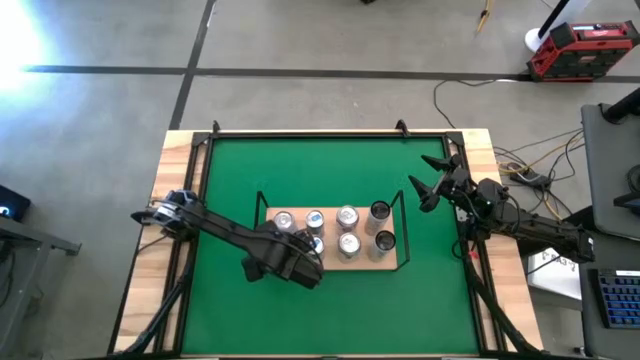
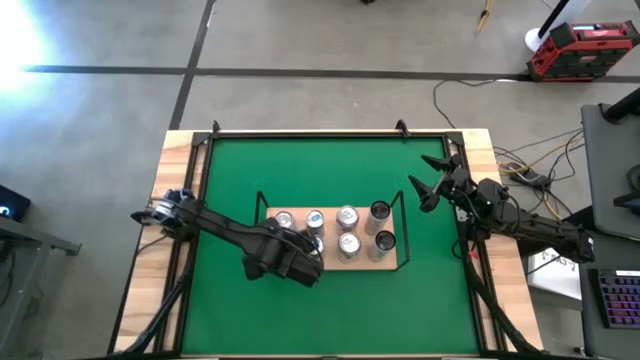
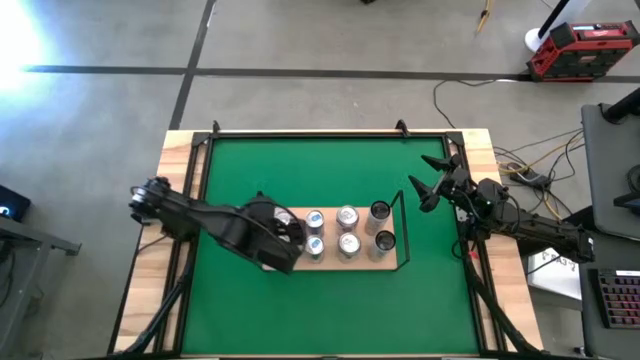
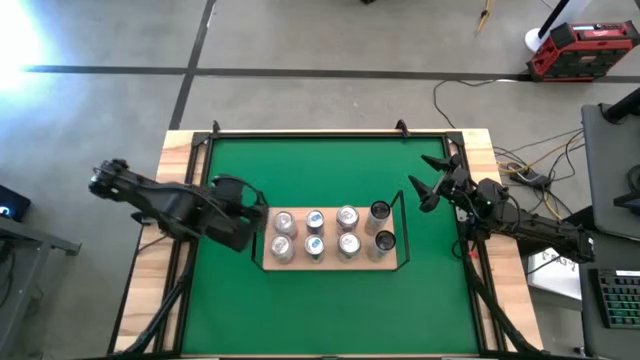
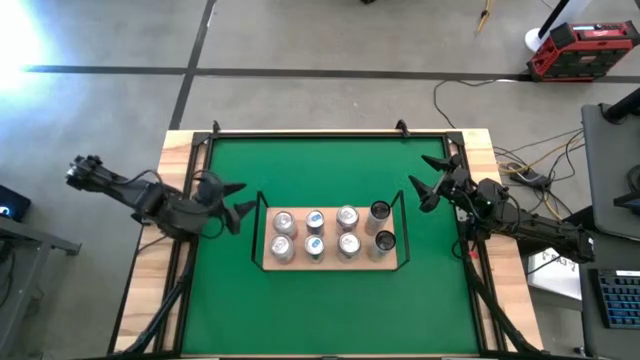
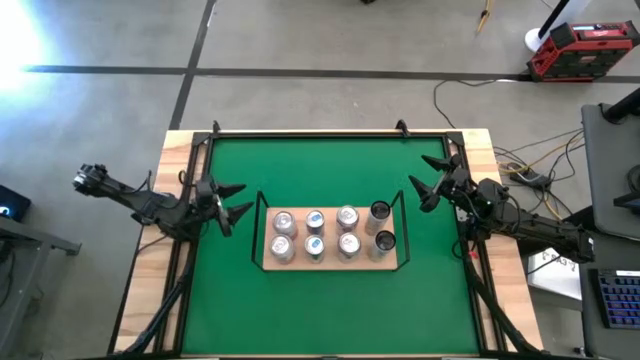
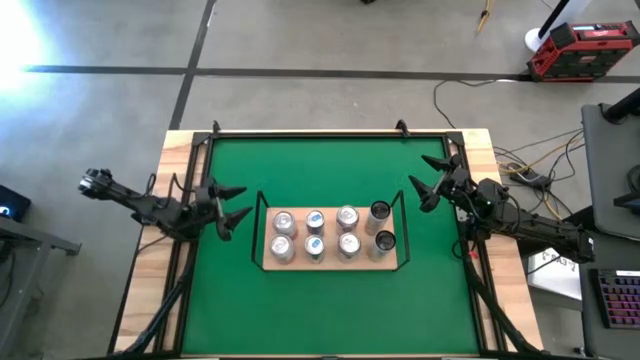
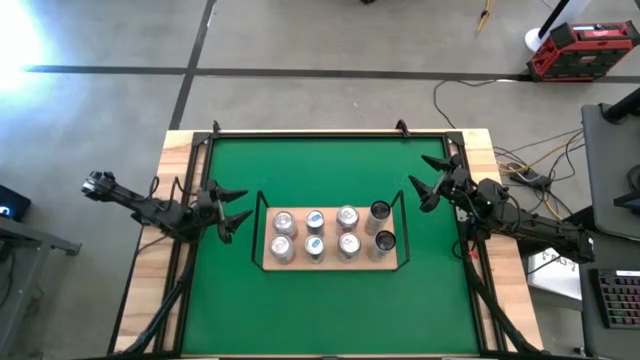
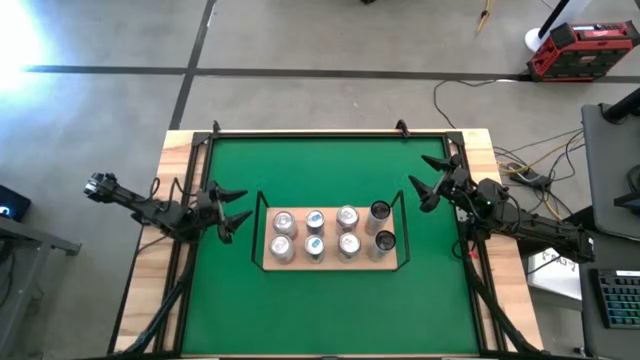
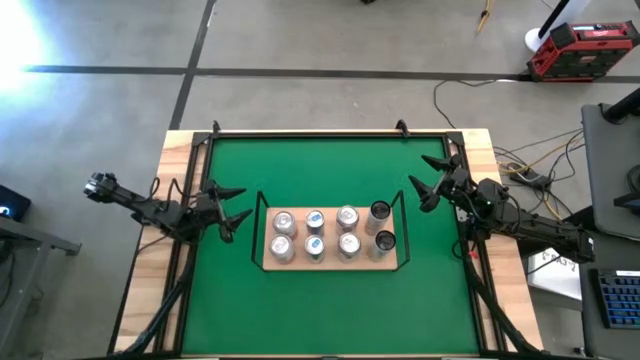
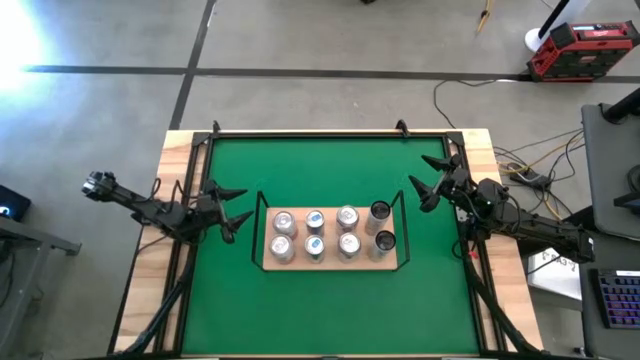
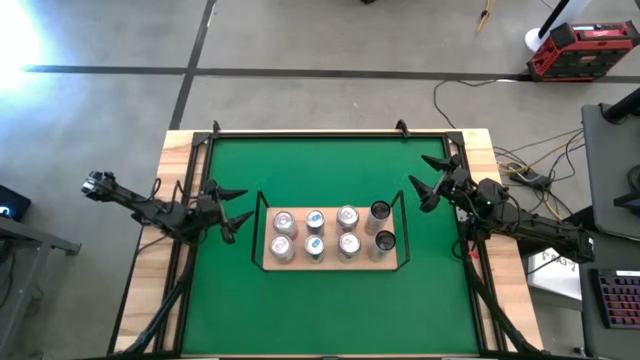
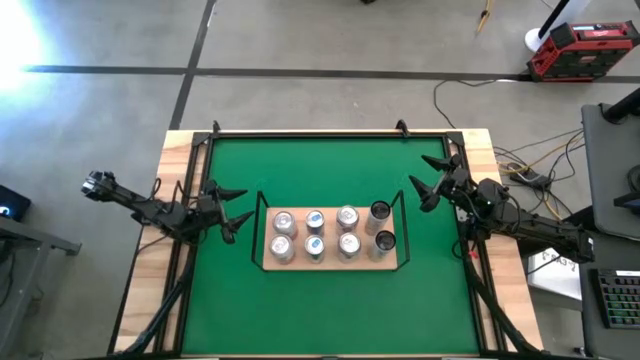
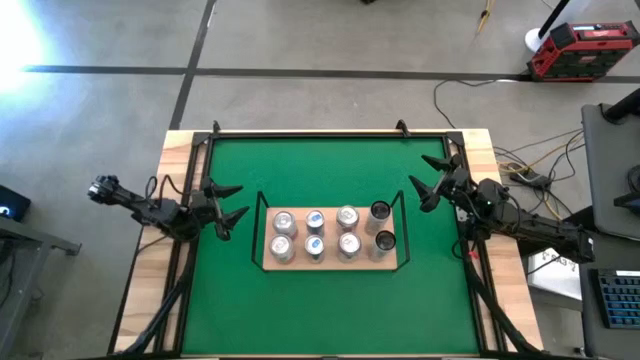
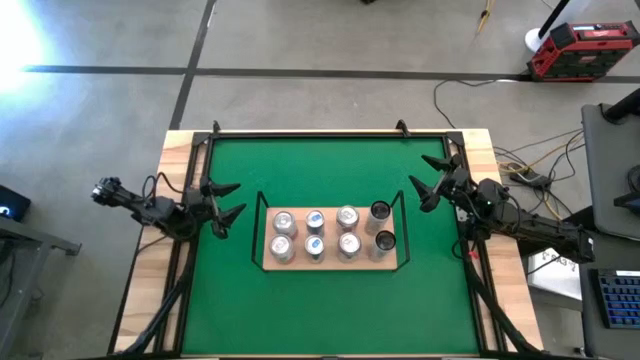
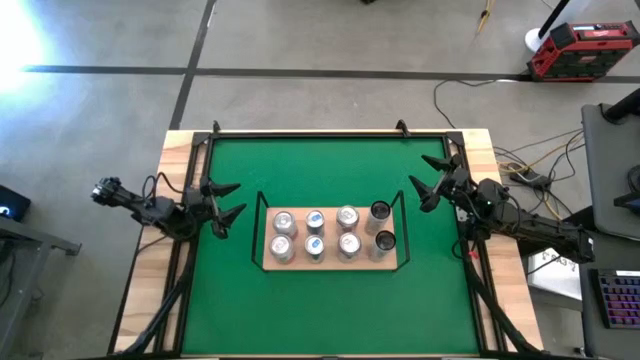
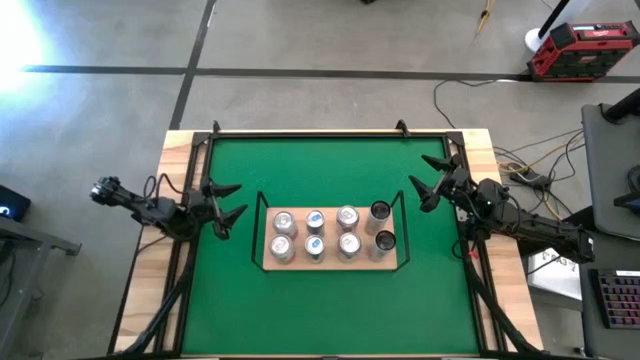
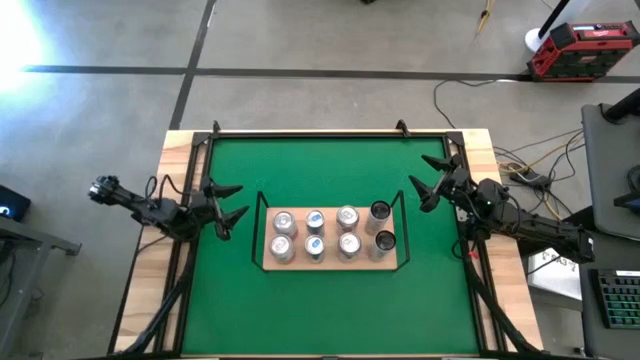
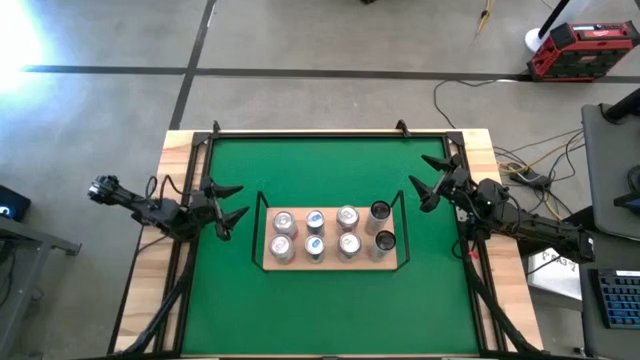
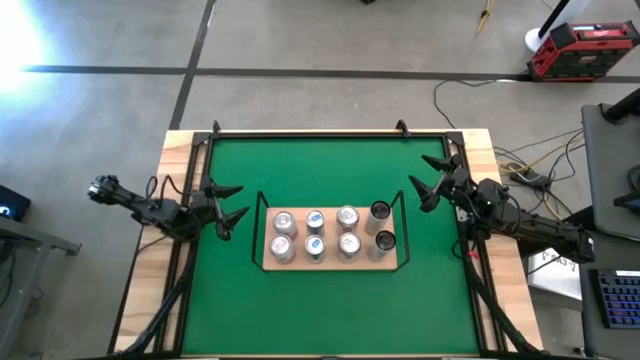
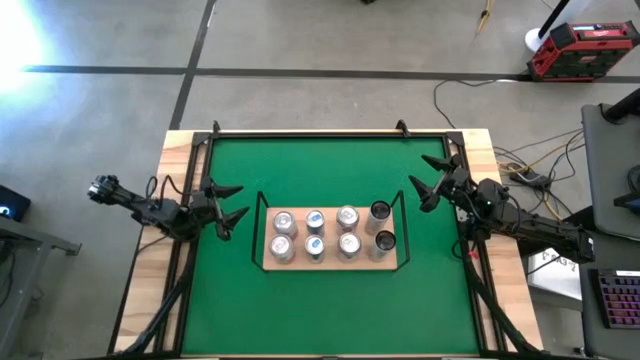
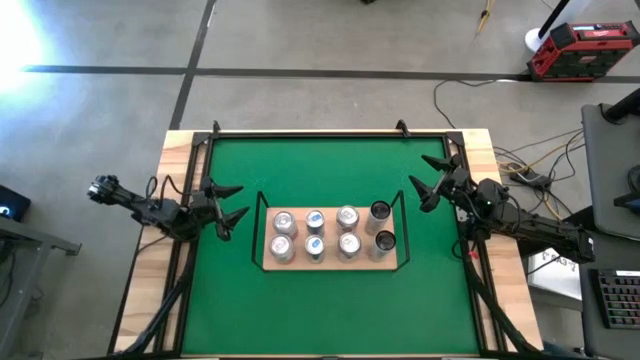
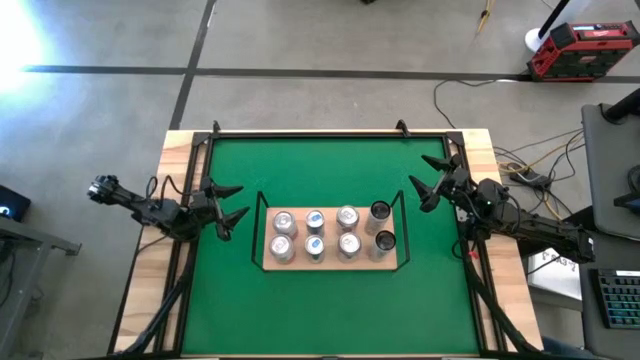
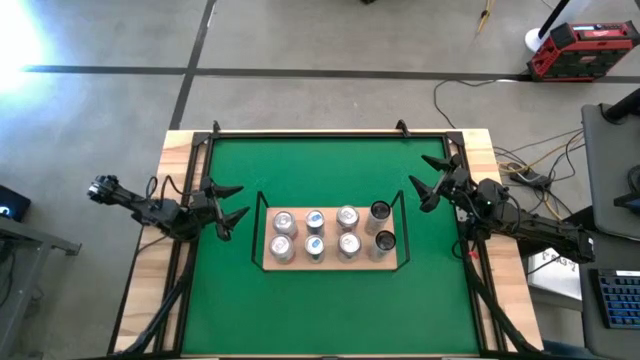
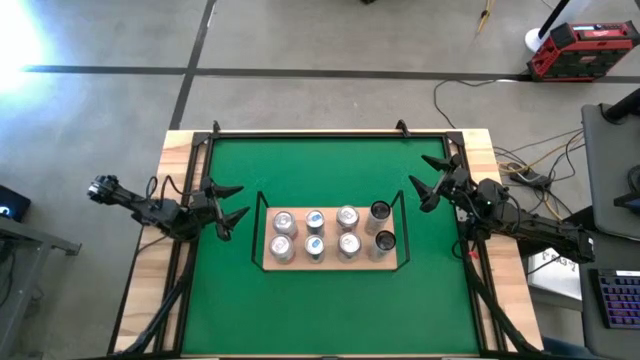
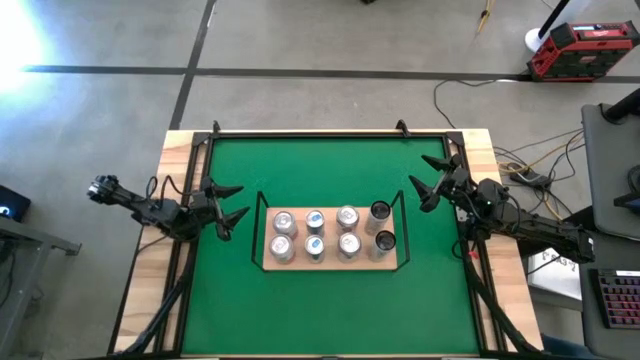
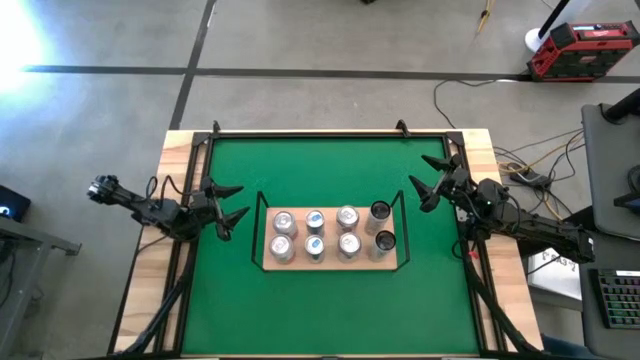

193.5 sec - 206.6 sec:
Task: Place canned beverage on shelf
Return to Home Position

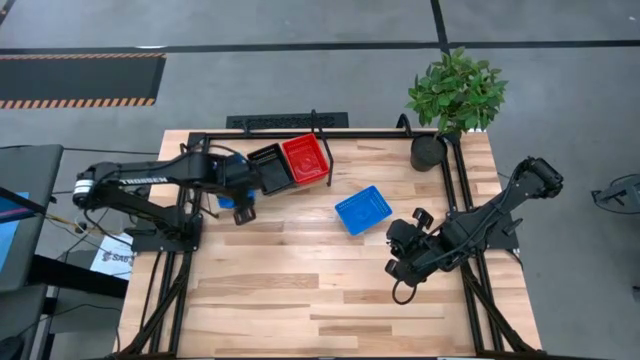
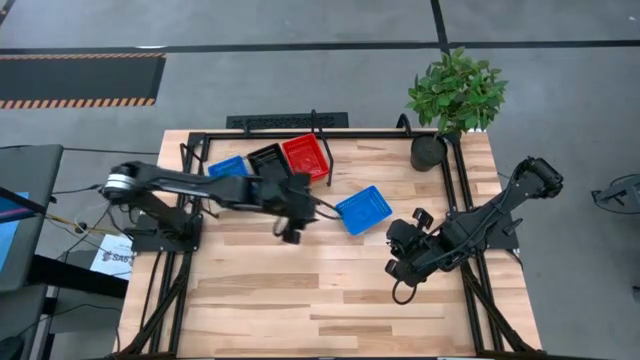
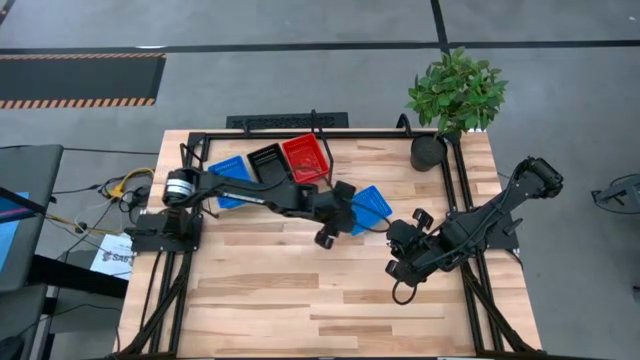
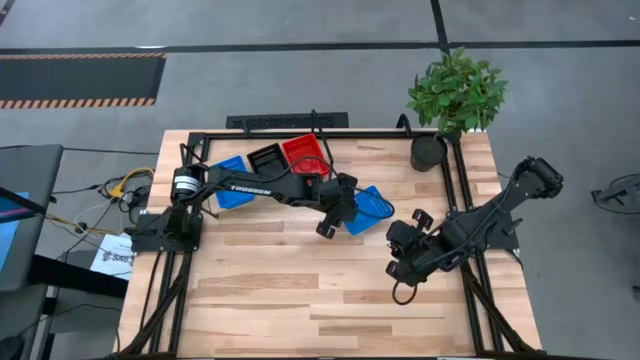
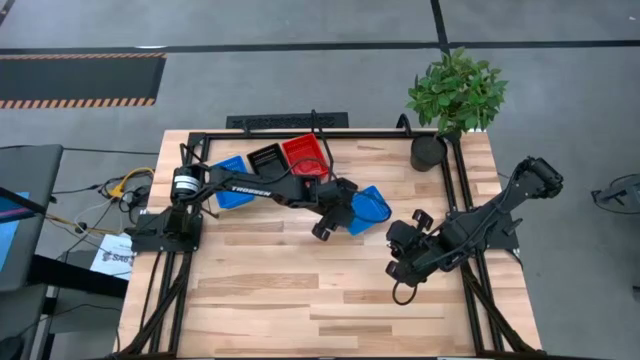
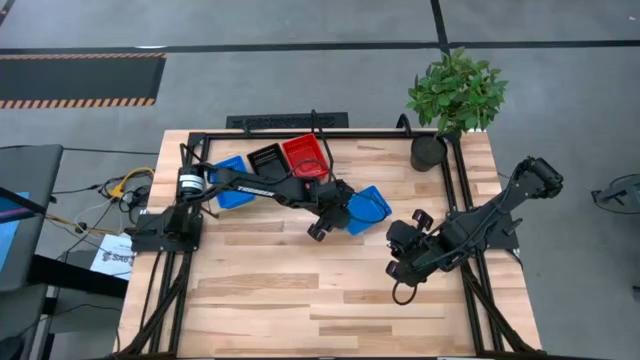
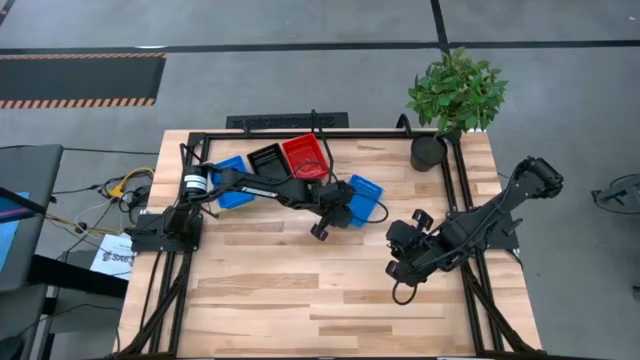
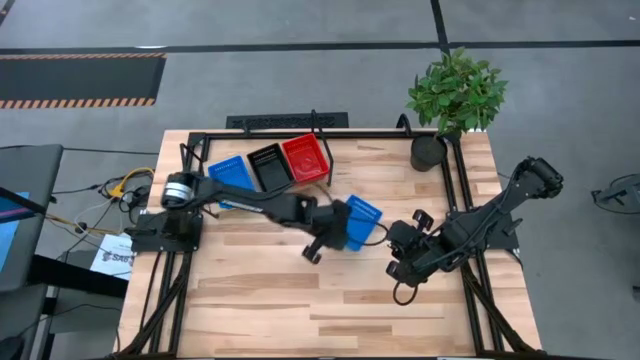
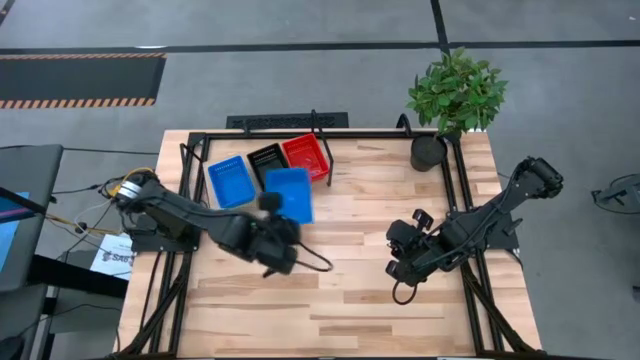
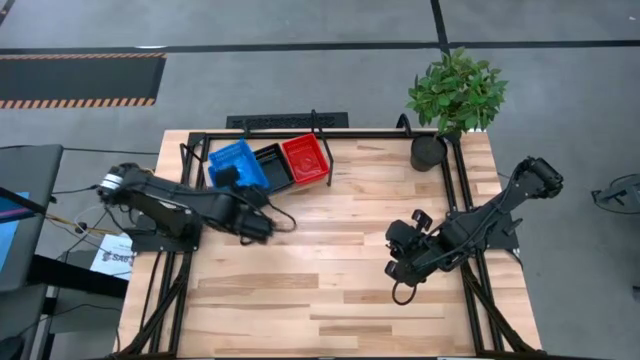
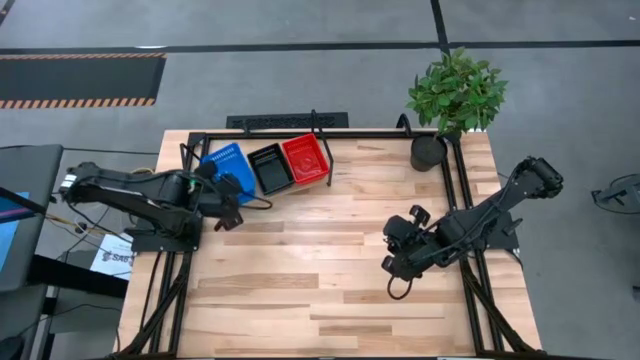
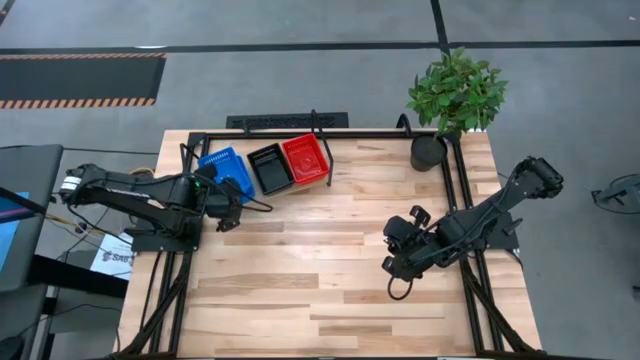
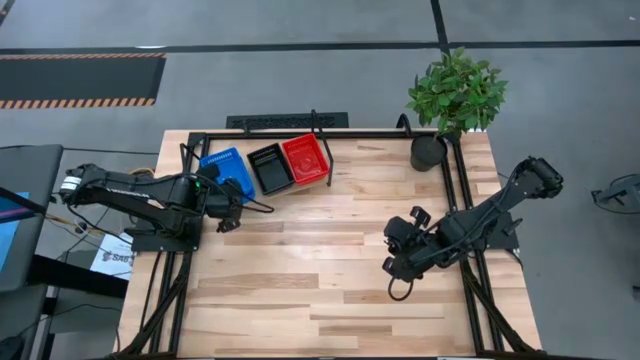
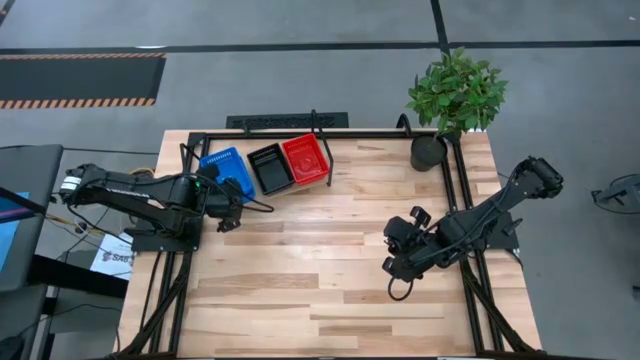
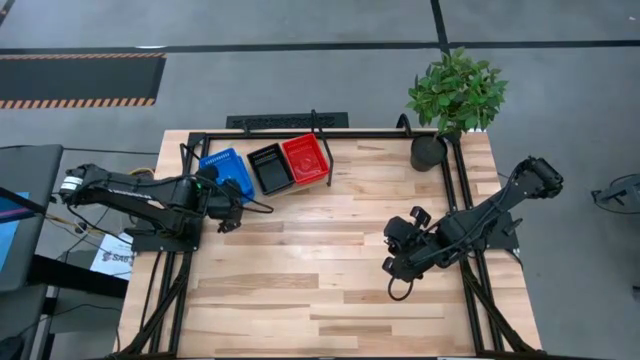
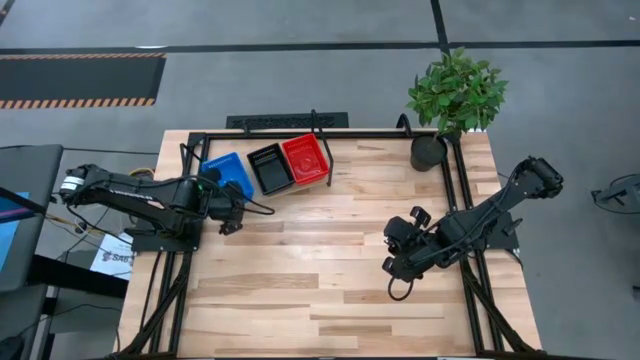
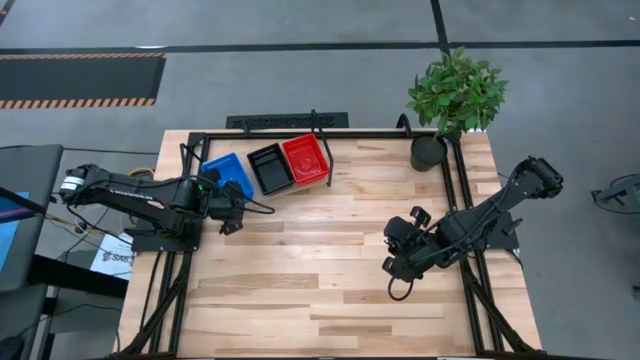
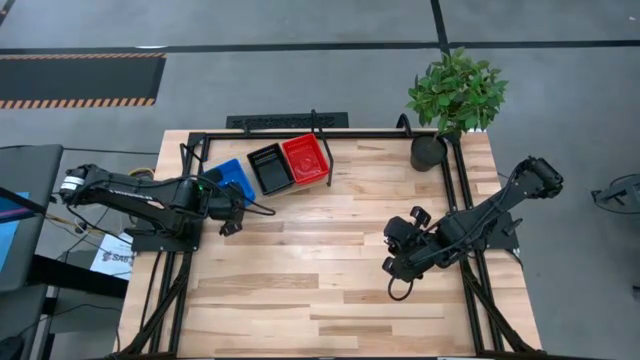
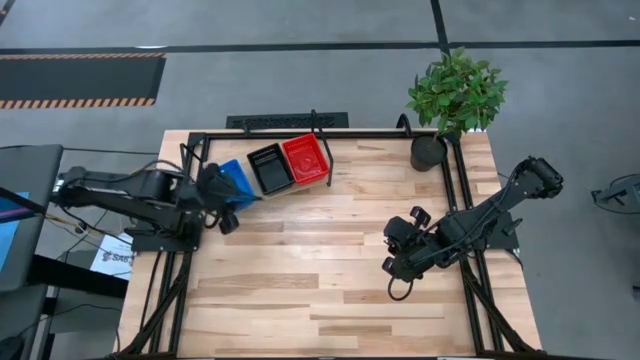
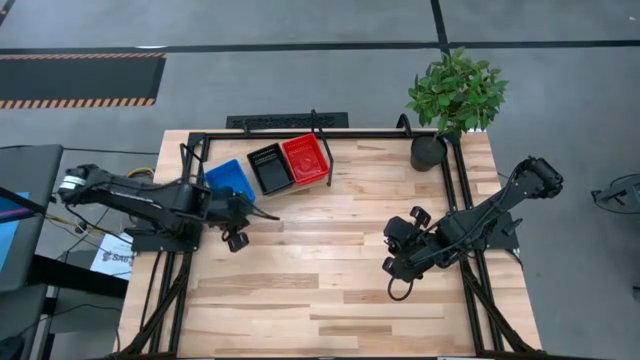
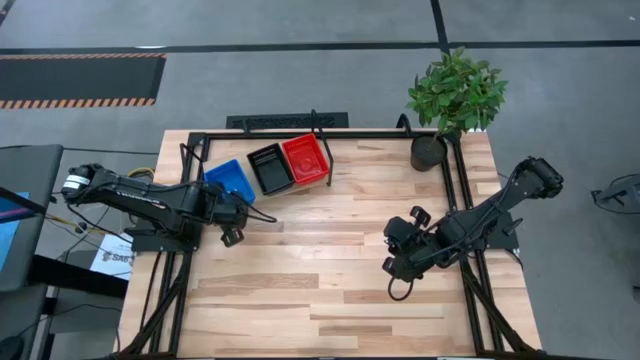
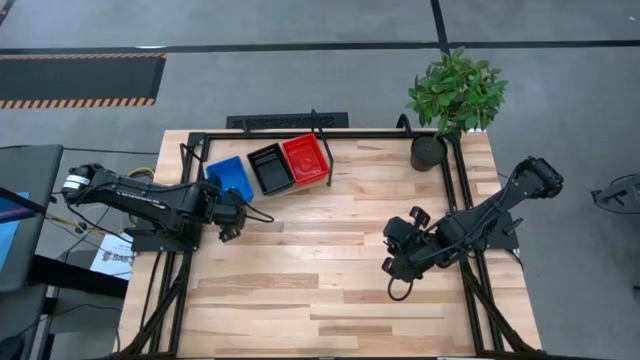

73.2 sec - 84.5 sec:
Task: Stack baskets on shelf by color
Stack the blue bin on the blue bin on the shelf
